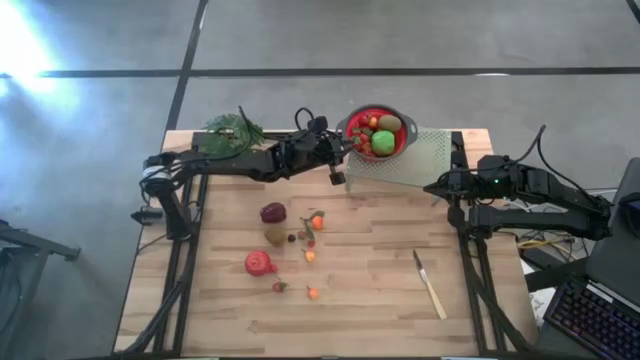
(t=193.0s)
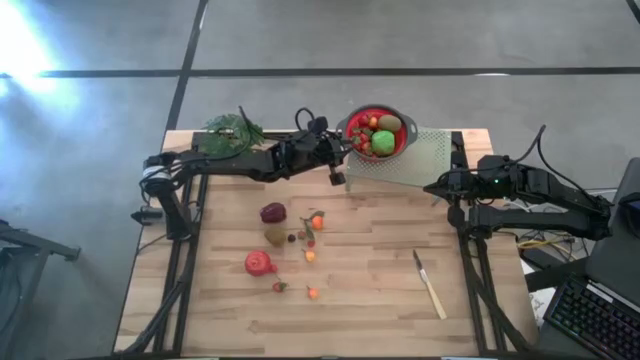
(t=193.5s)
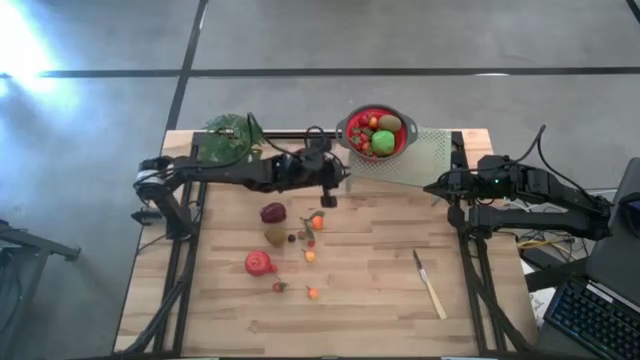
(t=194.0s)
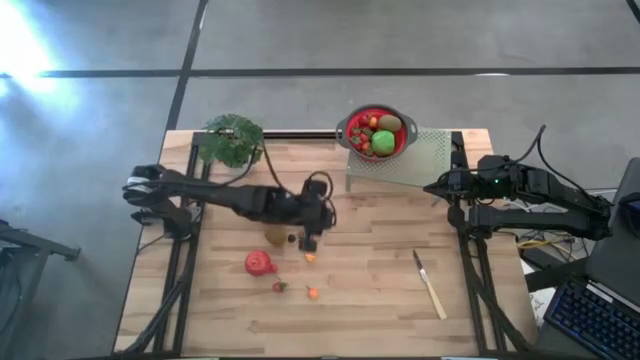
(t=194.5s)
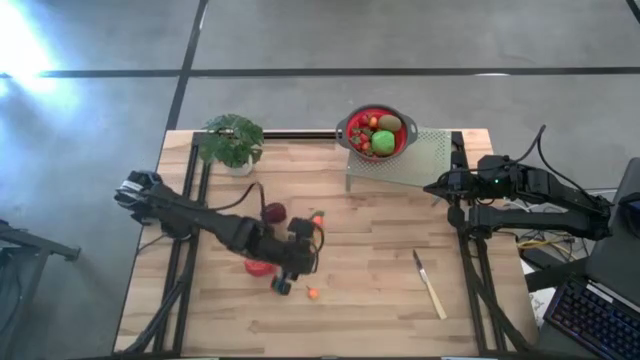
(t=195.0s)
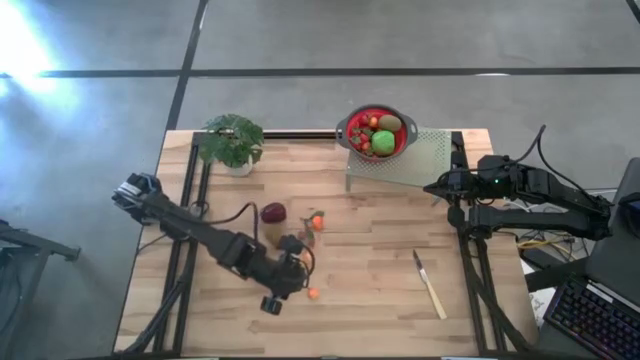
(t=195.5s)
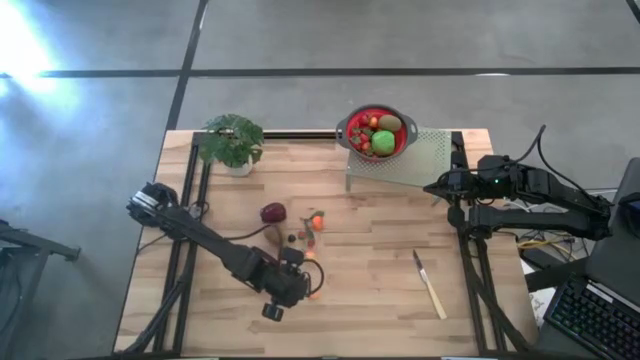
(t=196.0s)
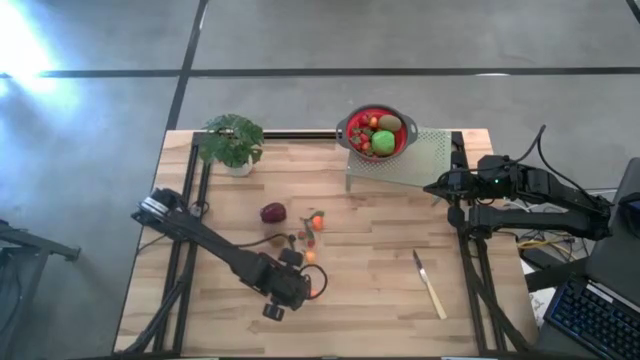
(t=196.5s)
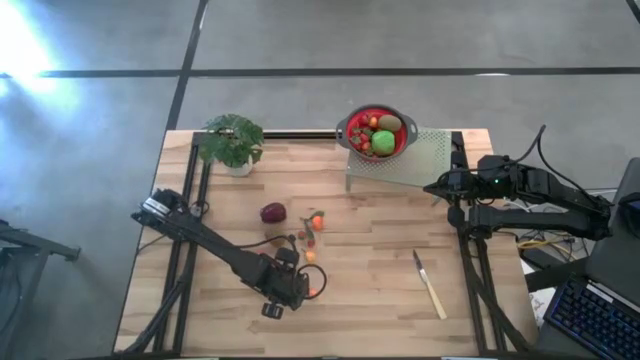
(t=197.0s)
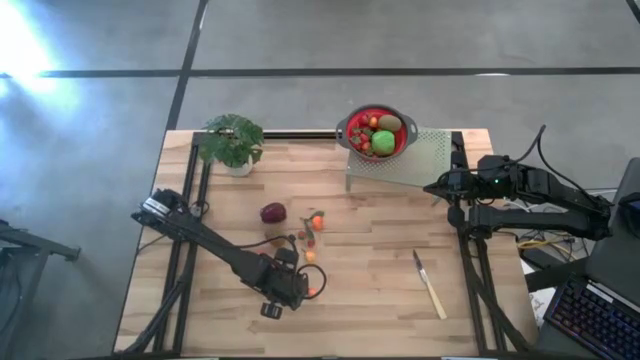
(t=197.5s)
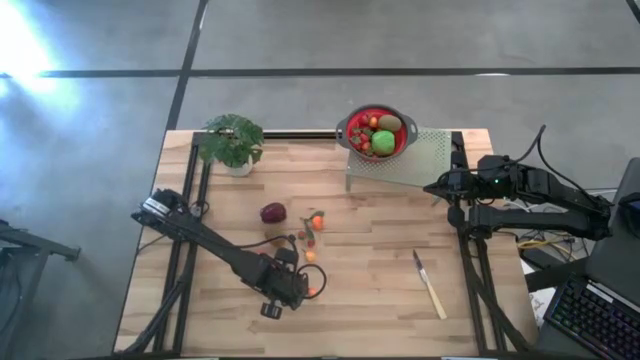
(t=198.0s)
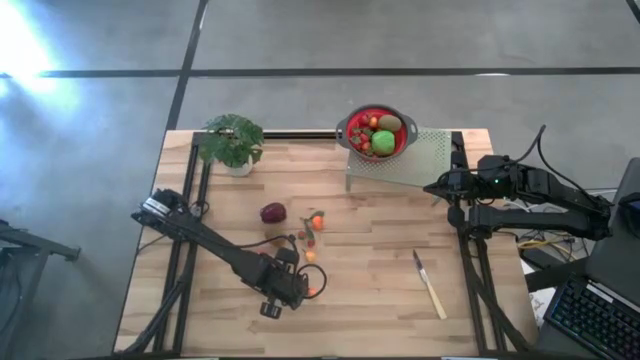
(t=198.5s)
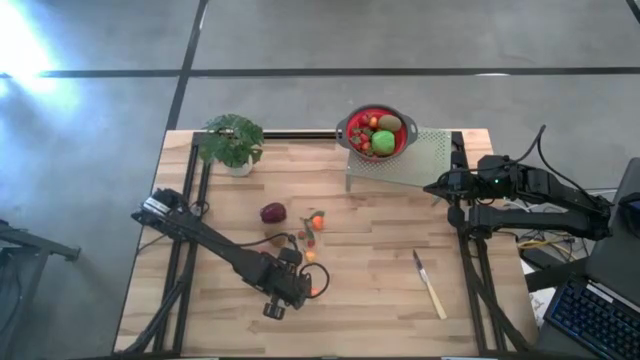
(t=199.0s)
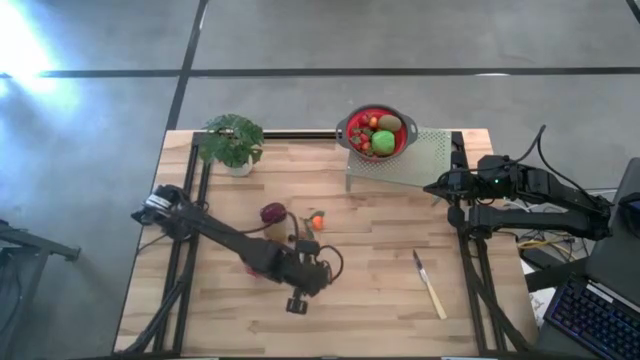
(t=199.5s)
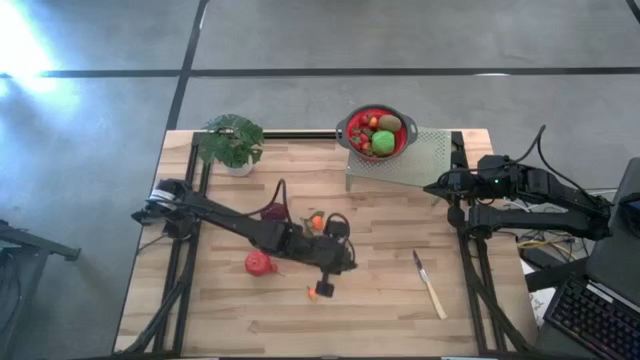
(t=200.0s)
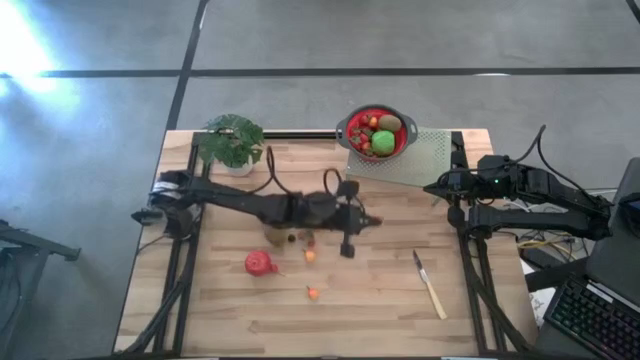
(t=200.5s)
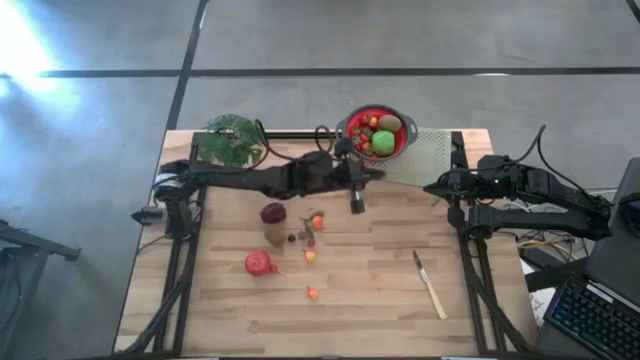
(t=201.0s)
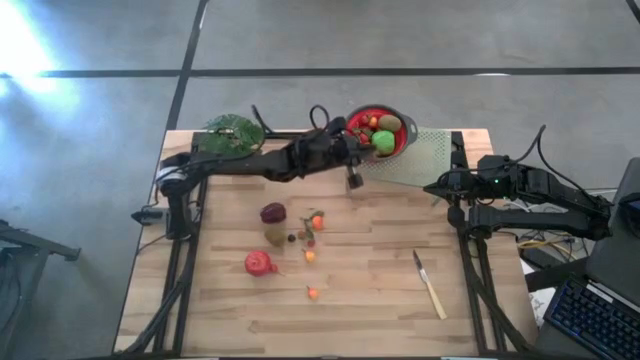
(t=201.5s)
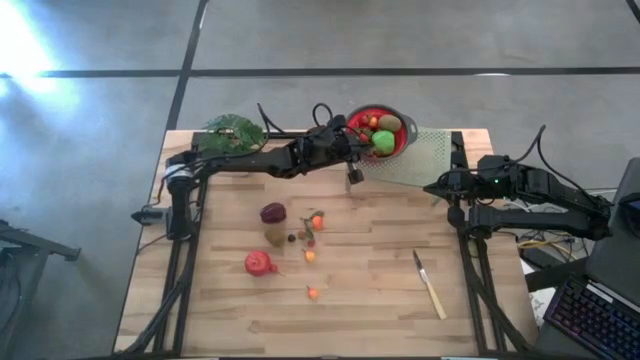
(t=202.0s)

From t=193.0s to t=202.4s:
Task: Pick & Place Fruit
Put the strawberry into the strainer bowl on the shelf

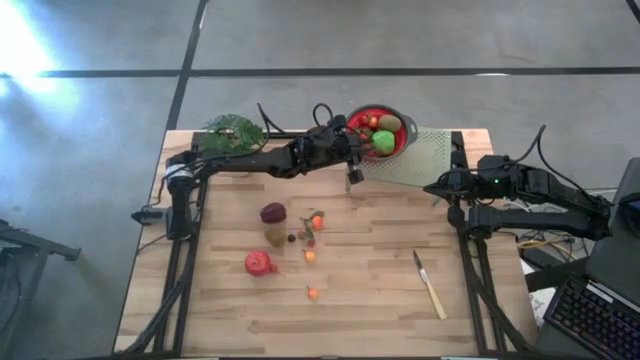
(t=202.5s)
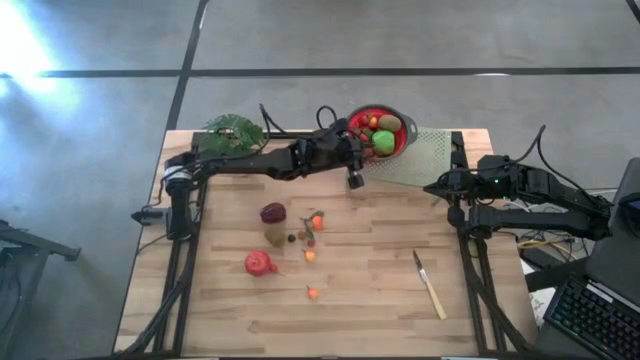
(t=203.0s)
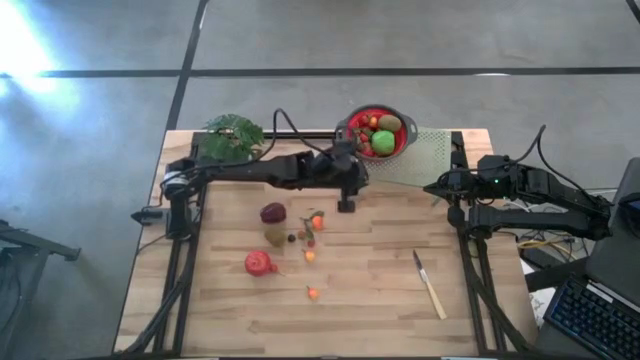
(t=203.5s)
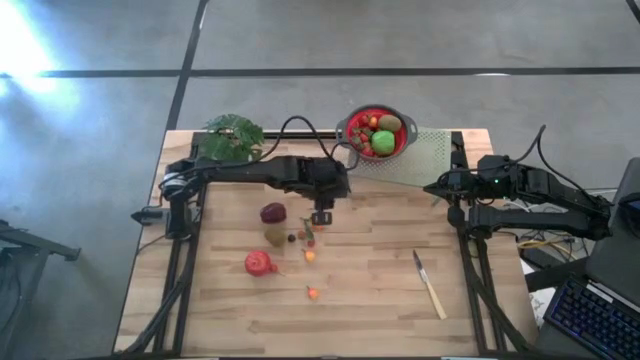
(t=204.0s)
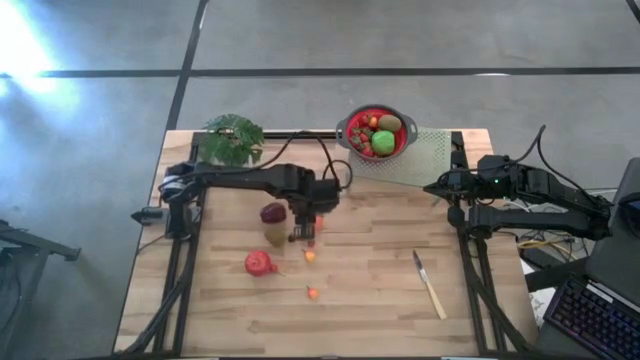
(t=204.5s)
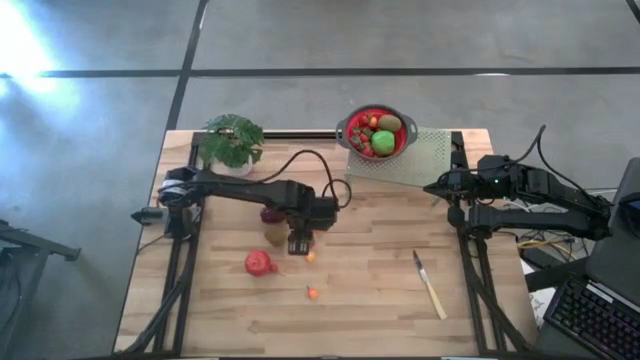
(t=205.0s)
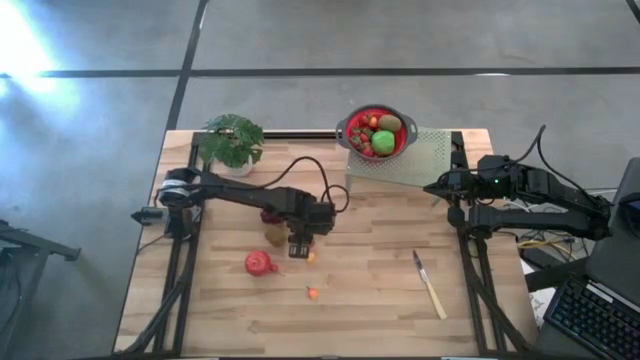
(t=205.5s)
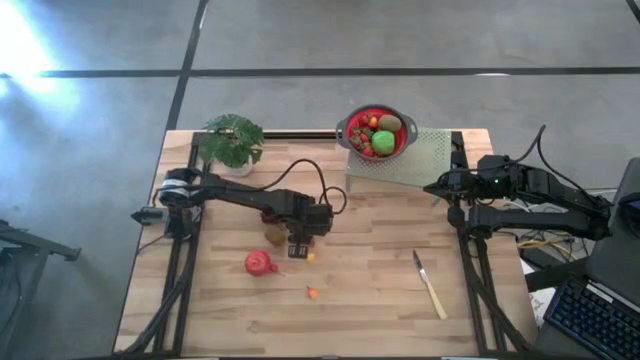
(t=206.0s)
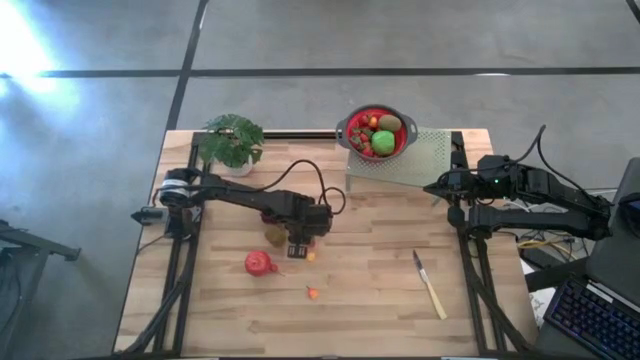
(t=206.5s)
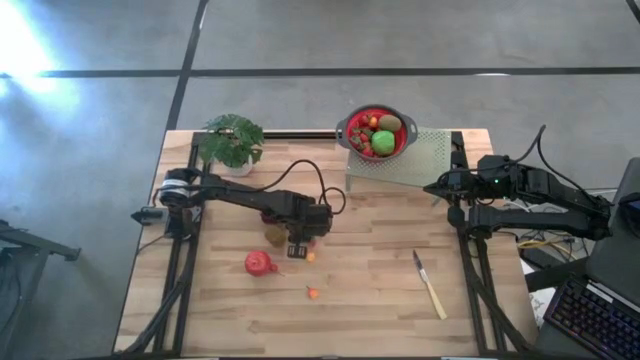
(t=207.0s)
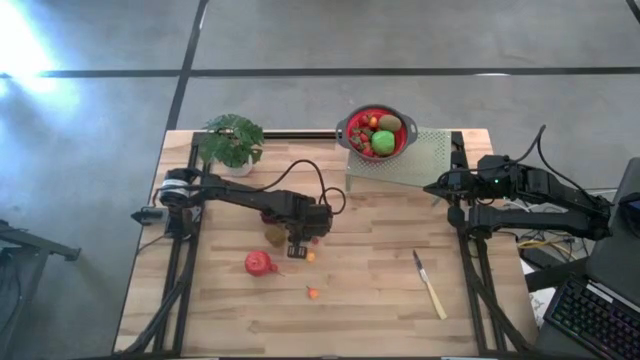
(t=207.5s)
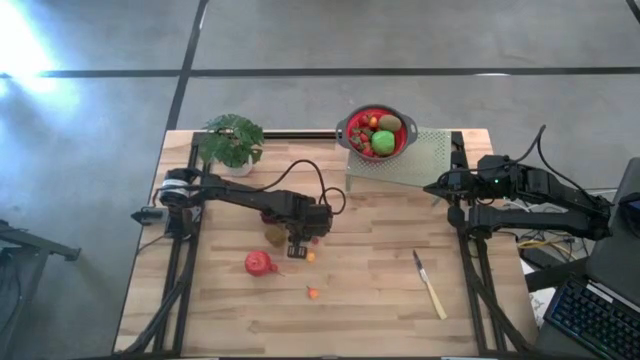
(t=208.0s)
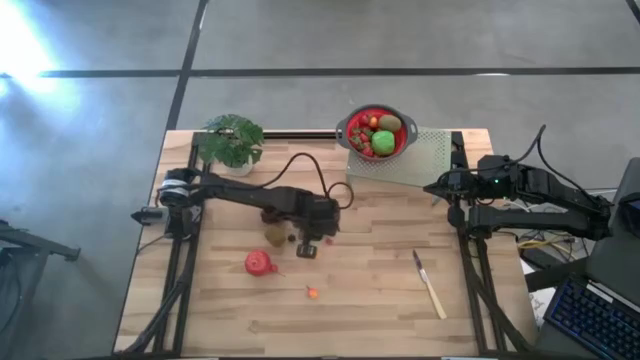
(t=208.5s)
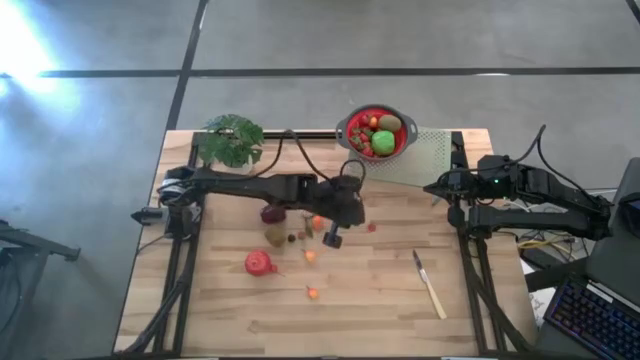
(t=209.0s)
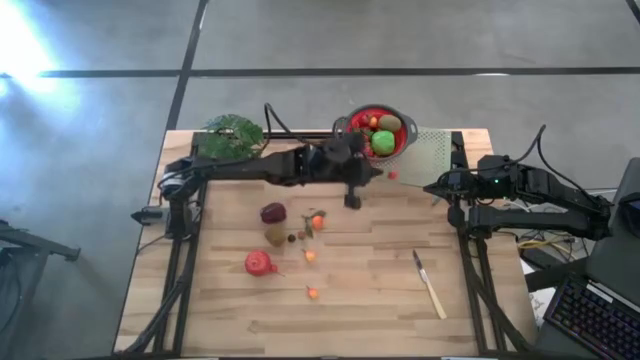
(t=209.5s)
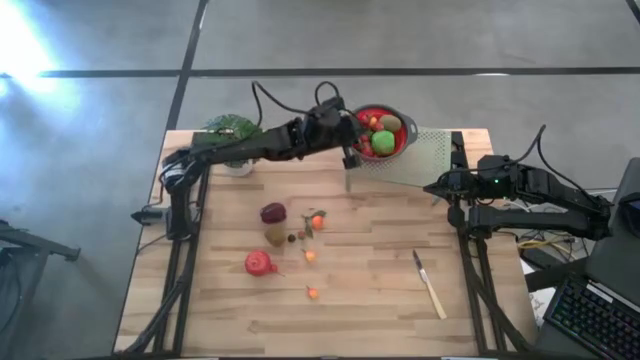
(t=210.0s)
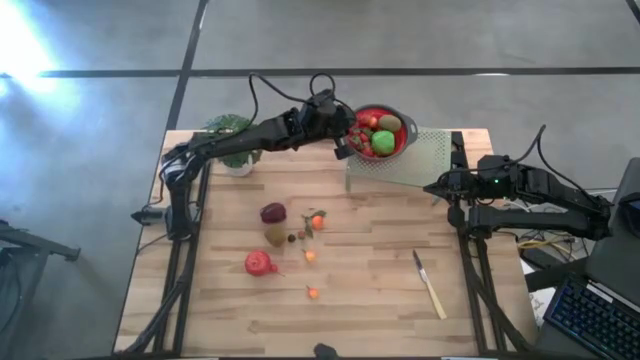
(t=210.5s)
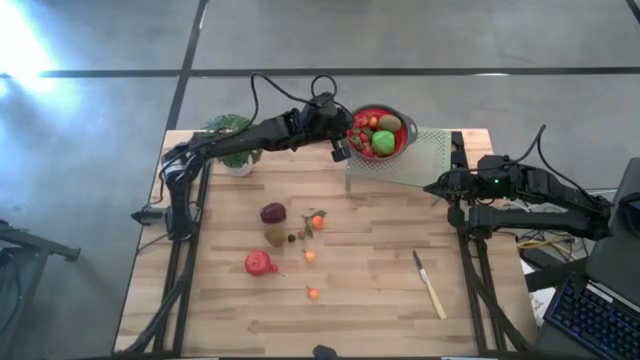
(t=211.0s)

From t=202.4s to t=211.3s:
Put the strawberry into the strainer bowl on the shelf
